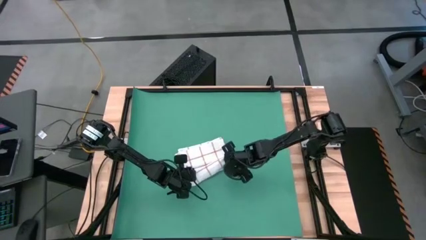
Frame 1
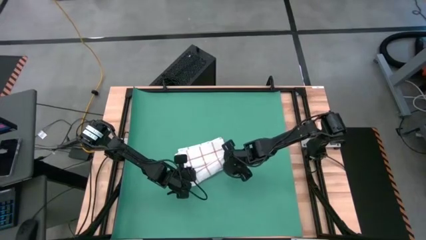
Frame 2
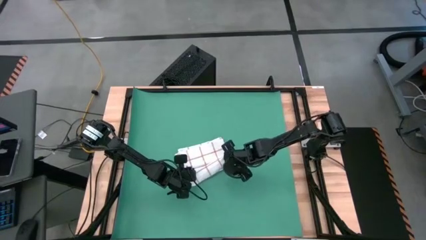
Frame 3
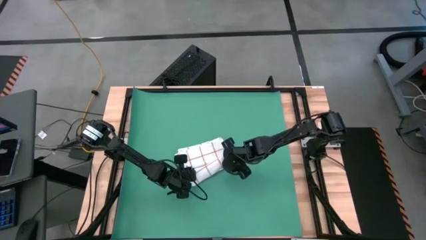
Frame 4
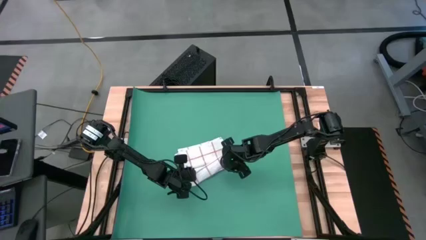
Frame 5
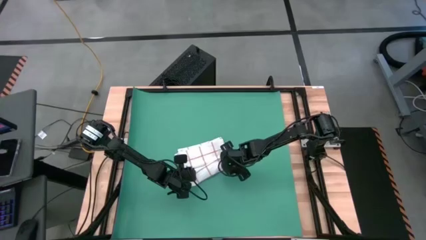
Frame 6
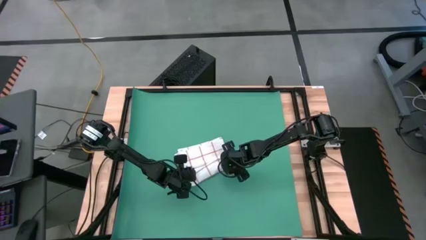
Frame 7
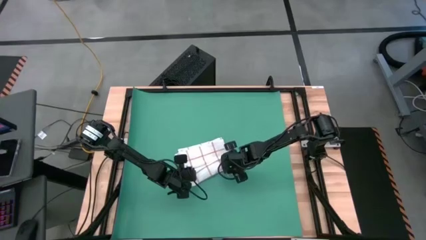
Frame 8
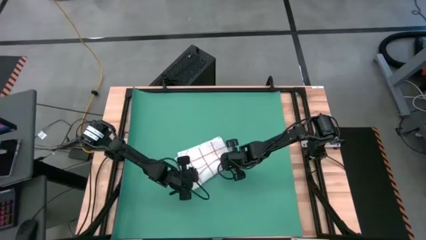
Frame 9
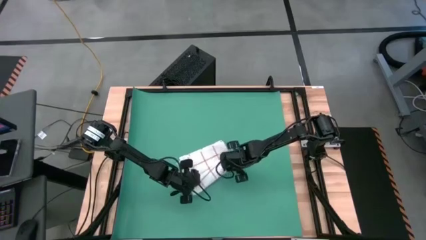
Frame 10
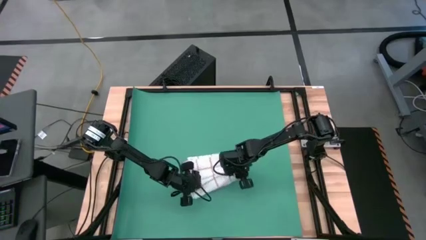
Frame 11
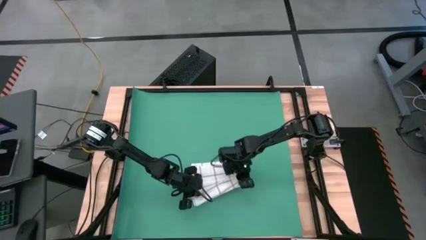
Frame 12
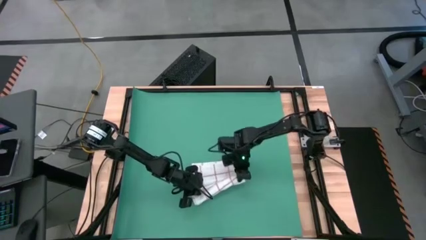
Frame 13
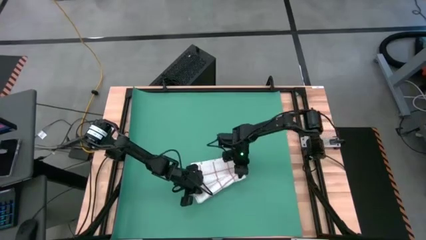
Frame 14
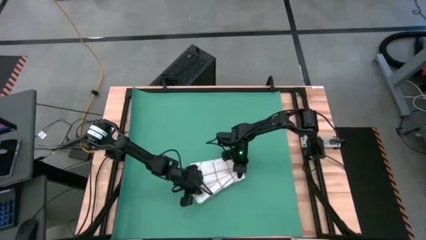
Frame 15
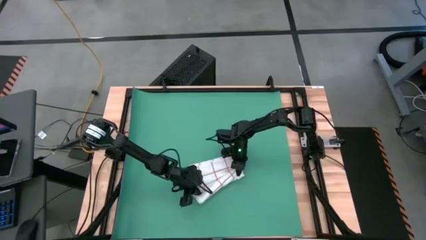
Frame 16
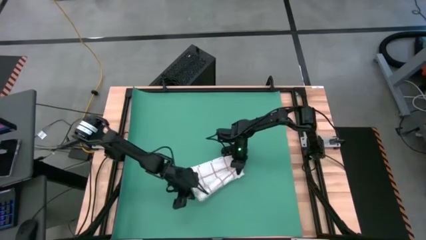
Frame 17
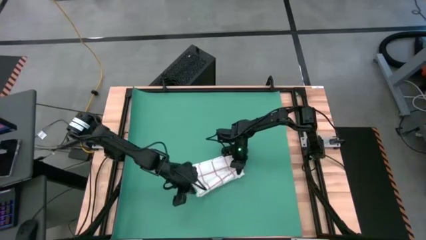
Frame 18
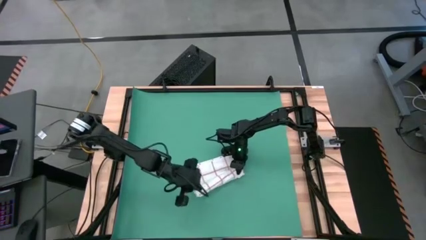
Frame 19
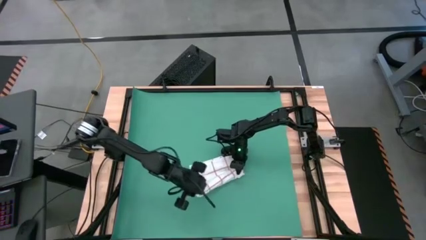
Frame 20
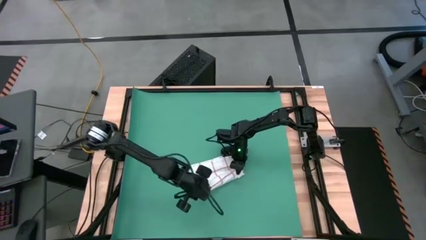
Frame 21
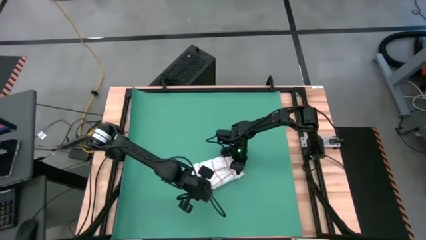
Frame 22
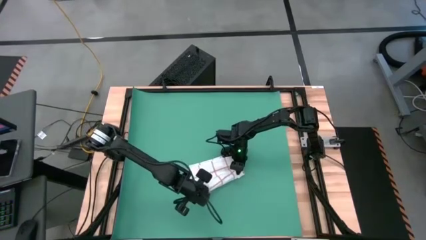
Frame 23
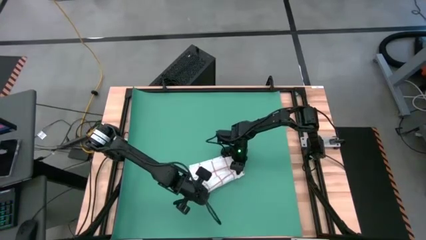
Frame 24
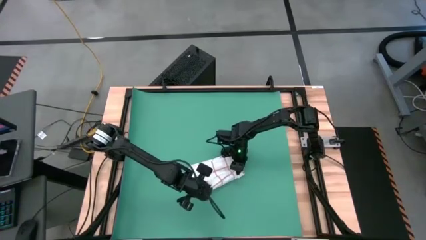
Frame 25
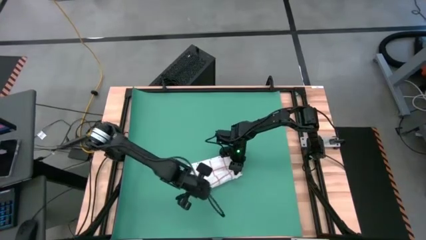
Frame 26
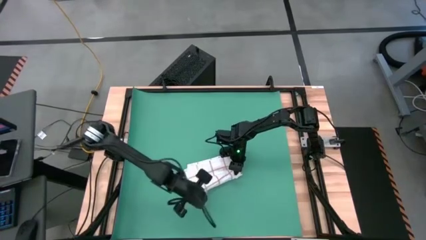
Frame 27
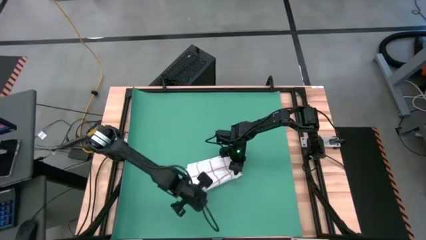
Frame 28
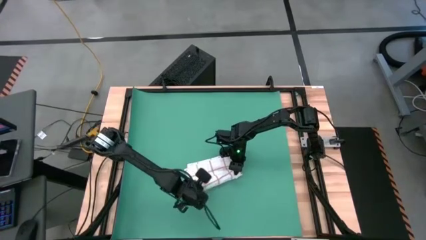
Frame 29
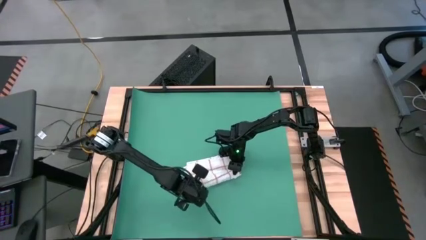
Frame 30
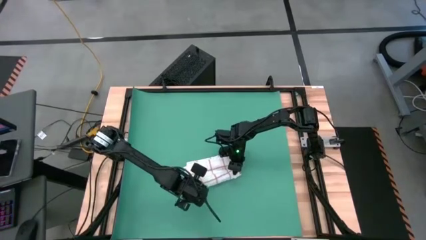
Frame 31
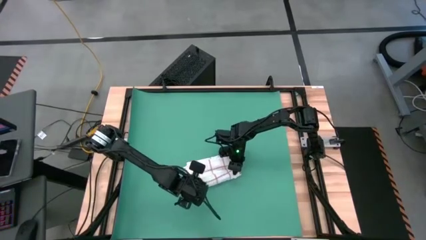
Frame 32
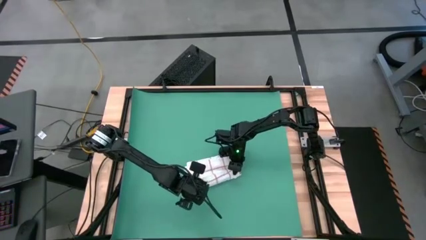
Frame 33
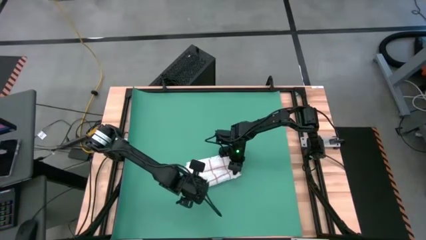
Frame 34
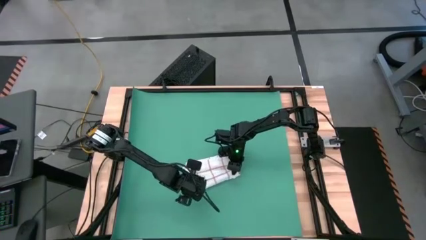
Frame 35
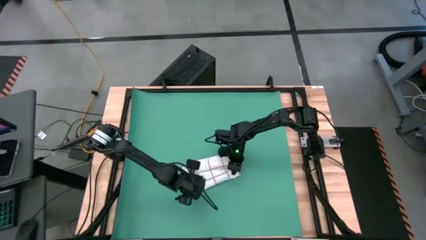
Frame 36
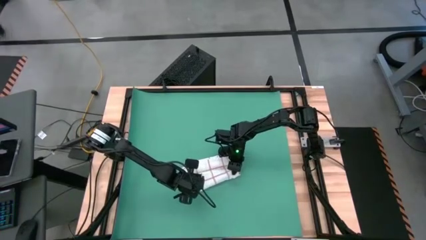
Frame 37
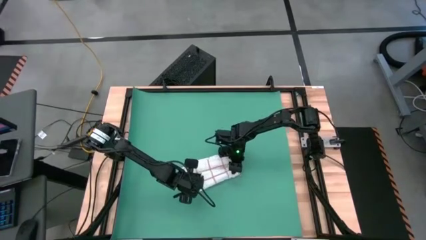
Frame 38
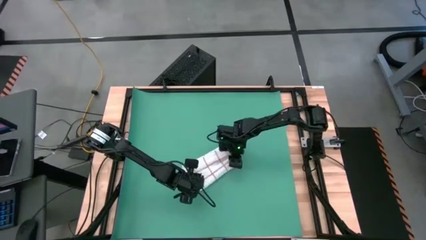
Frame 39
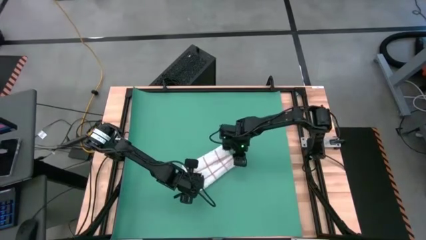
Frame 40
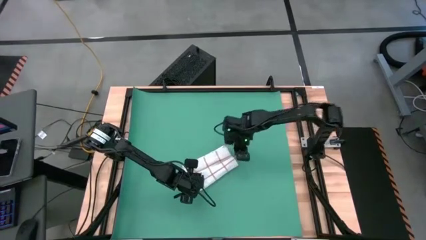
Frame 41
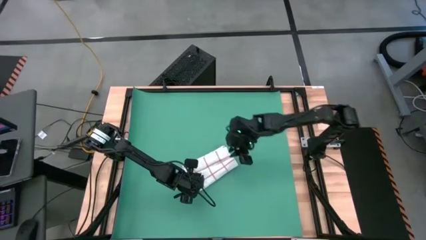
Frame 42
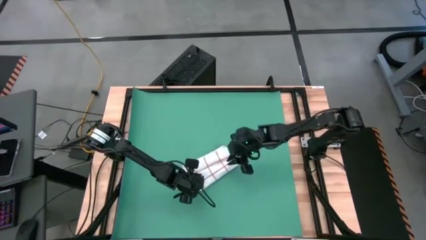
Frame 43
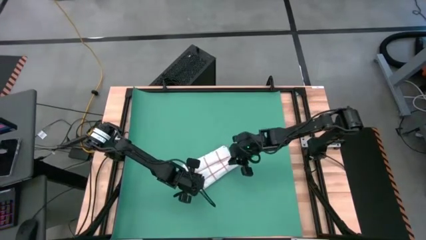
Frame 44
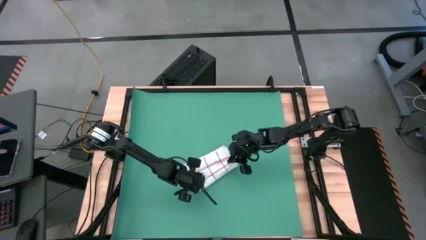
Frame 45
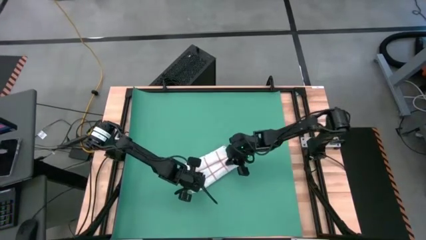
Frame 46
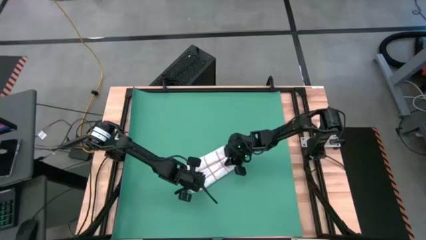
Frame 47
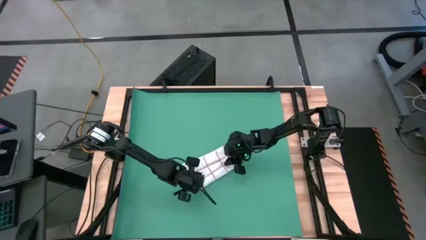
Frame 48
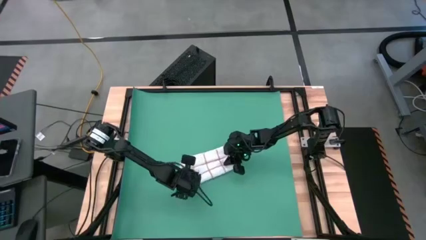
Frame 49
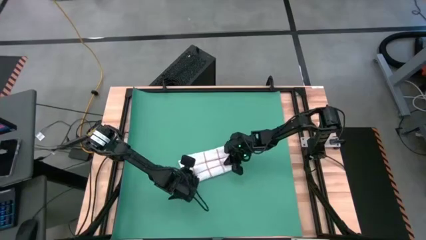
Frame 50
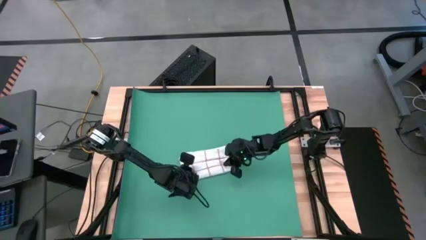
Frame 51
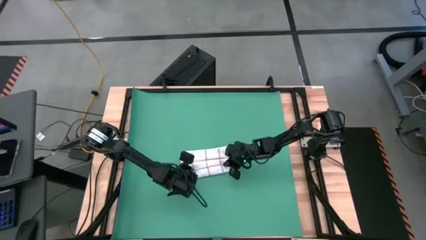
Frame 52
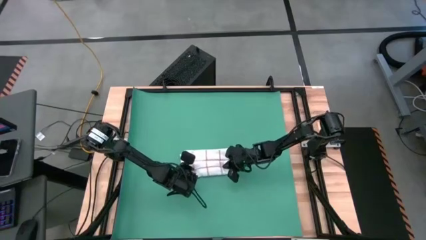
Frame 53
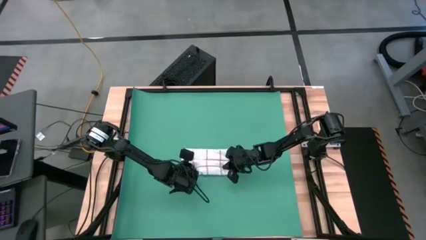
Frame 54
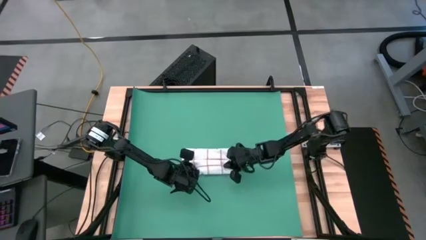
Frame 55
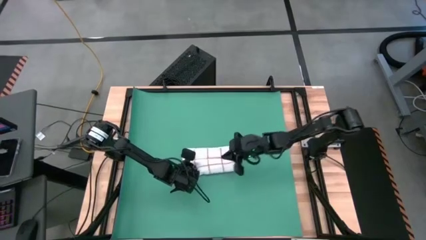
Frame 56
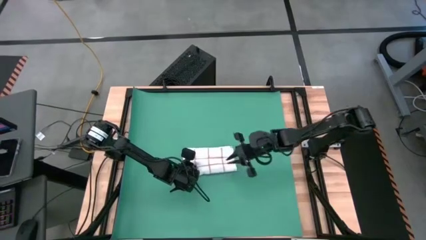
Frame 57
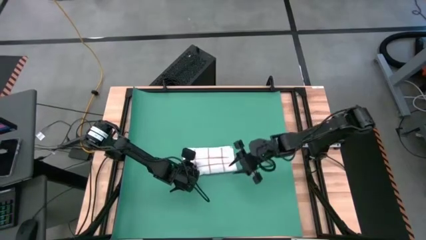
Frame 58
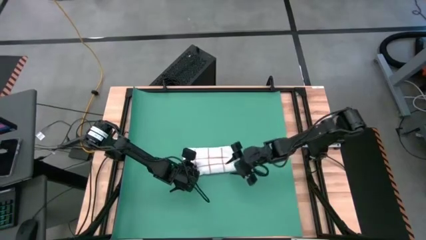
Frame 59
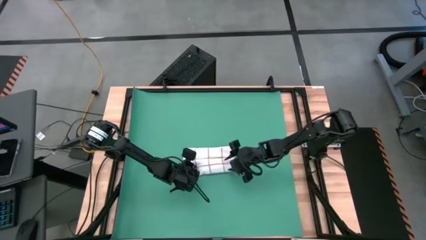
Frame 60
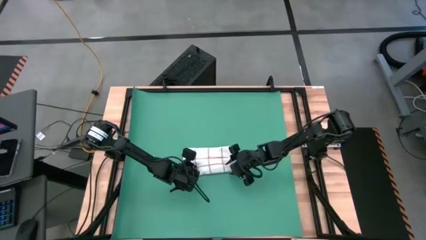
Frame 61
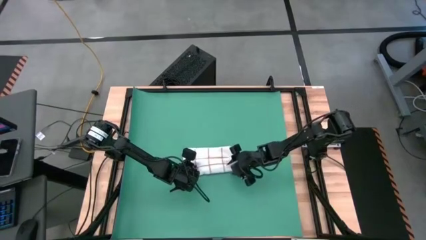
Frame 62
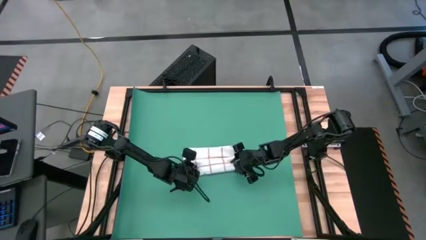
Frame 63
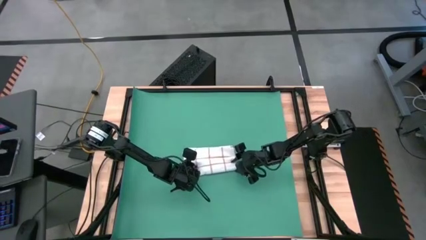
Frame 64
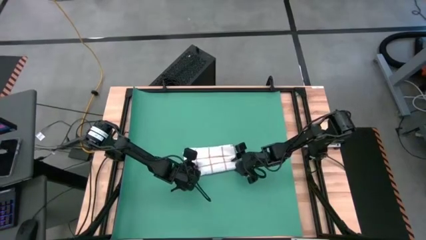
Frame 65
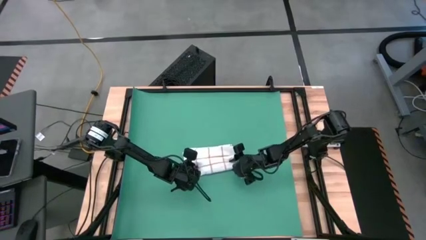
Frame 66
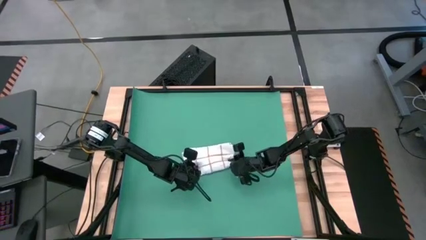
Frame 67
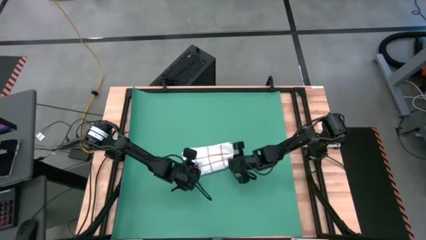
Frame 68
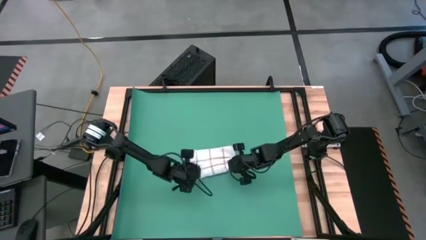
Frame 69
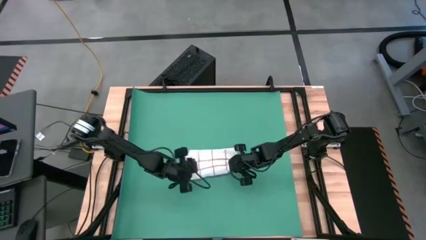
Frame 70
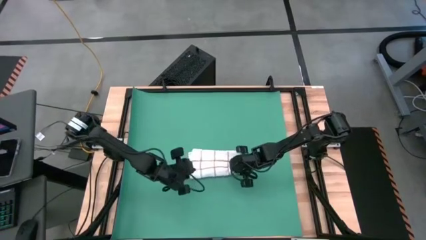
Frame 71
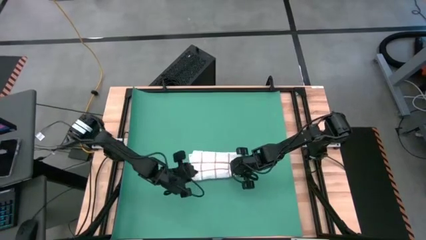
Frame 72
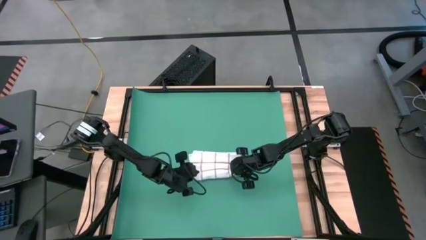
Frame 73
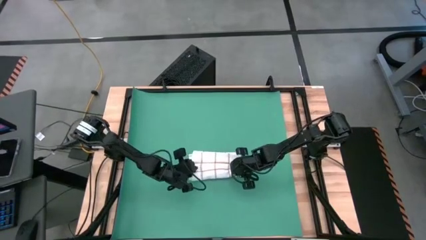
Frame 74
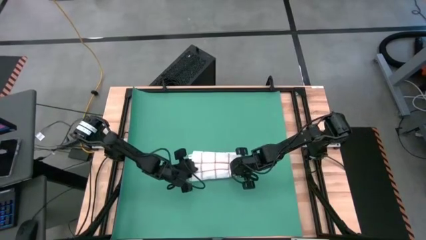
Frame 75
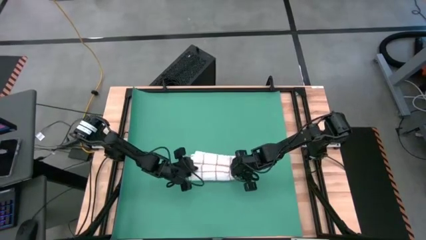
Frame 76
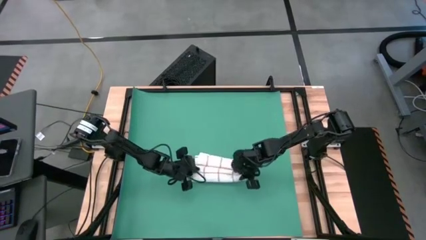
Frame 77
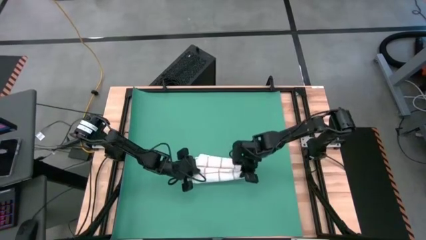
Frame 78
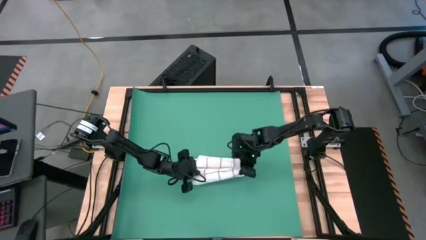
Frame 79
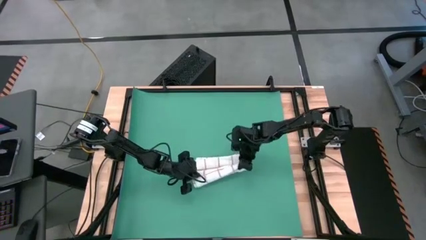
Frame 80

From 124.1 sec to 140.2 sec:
Task: Roll towel
Roll the white stripe towel

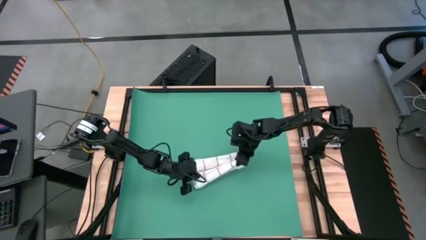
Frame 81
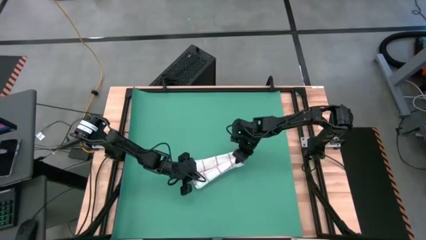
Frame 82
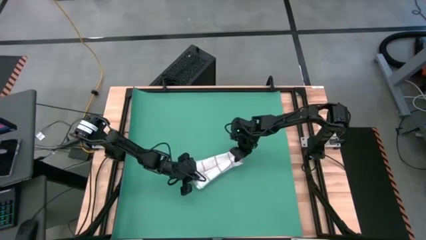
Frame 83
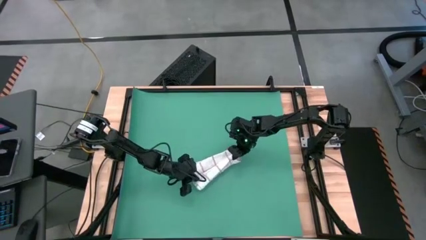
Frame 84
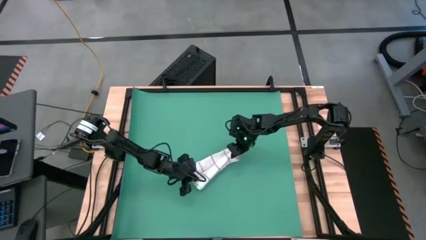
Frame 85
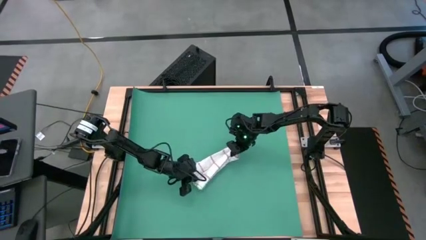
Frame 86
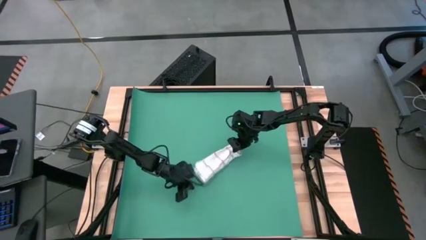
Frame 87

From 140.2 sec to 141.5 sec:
Roll the white stripe towel
